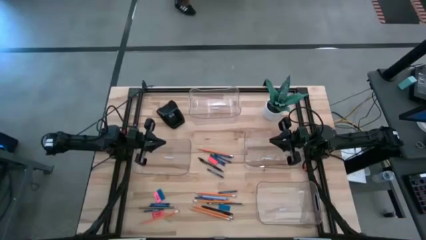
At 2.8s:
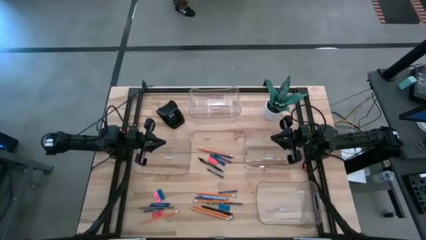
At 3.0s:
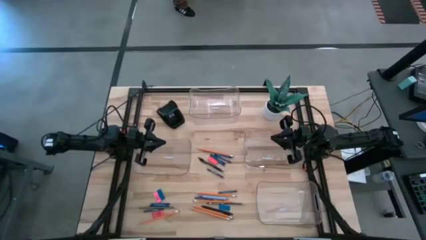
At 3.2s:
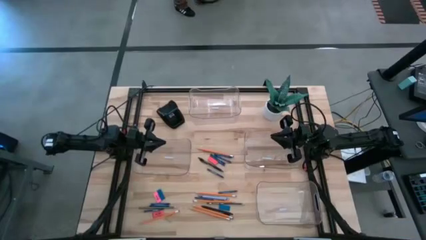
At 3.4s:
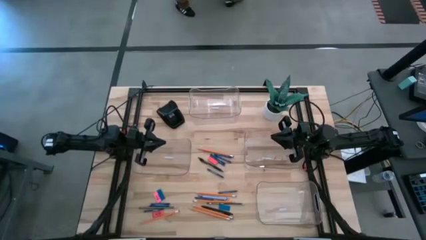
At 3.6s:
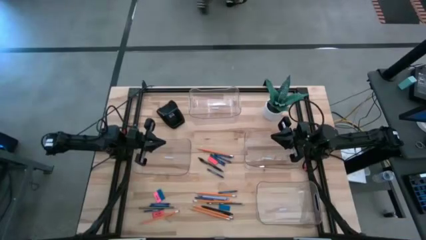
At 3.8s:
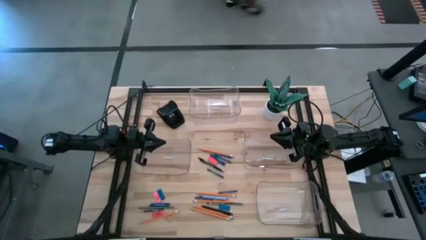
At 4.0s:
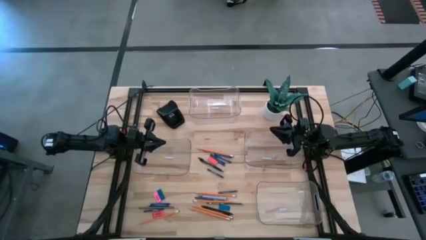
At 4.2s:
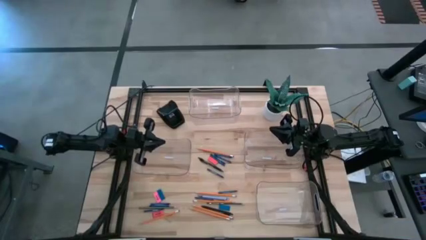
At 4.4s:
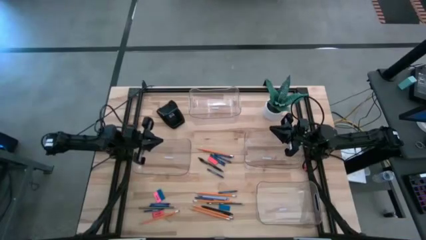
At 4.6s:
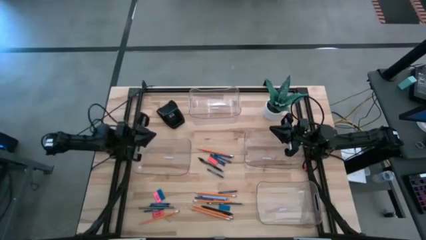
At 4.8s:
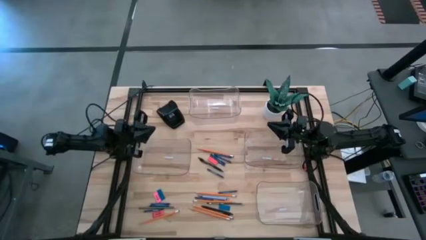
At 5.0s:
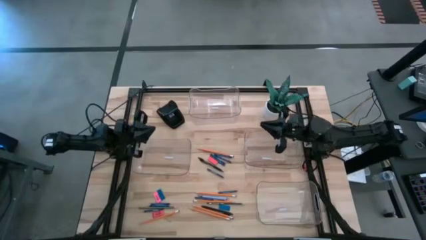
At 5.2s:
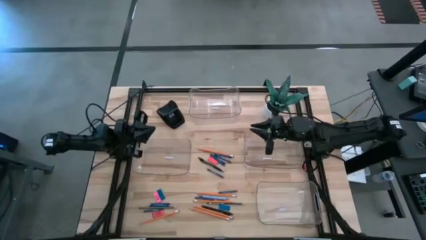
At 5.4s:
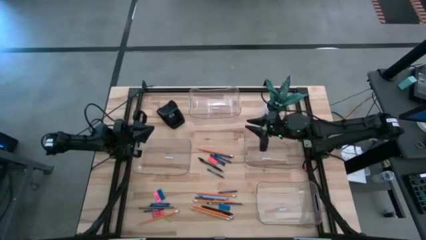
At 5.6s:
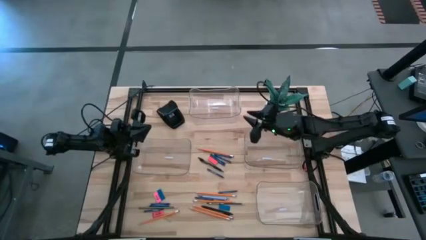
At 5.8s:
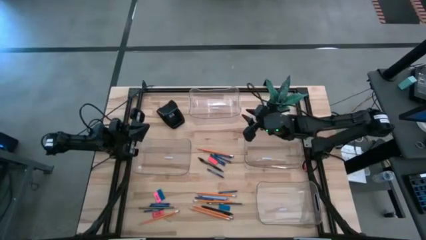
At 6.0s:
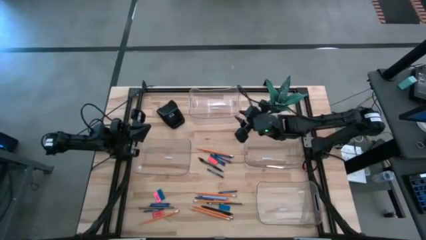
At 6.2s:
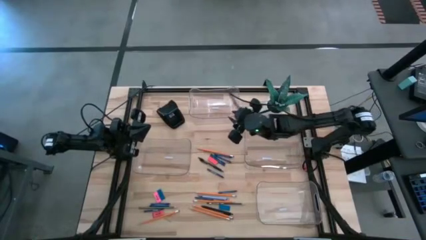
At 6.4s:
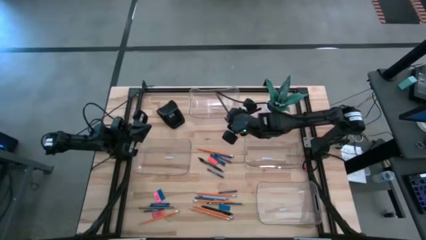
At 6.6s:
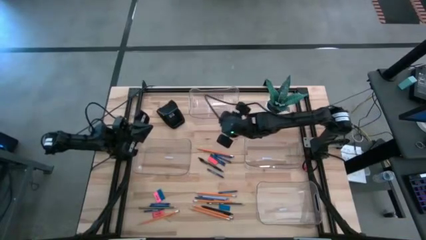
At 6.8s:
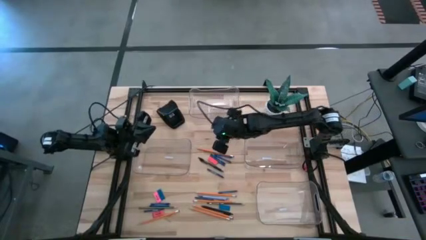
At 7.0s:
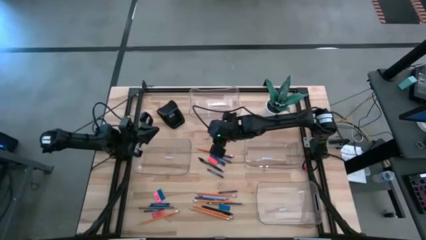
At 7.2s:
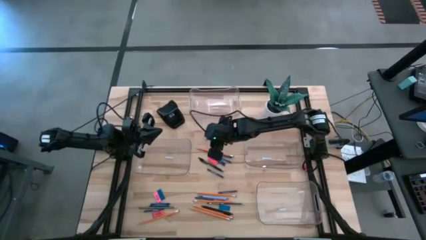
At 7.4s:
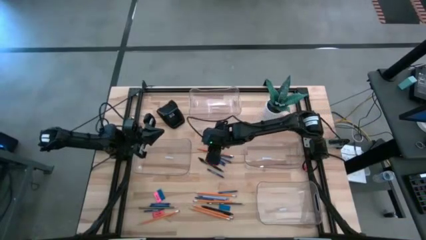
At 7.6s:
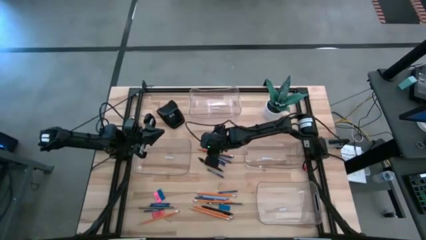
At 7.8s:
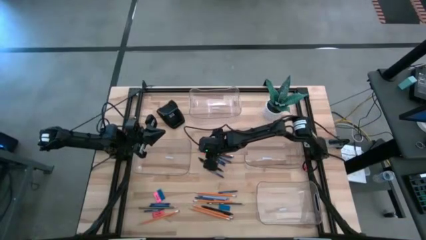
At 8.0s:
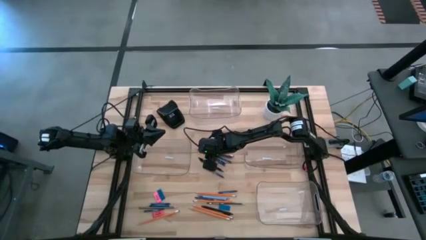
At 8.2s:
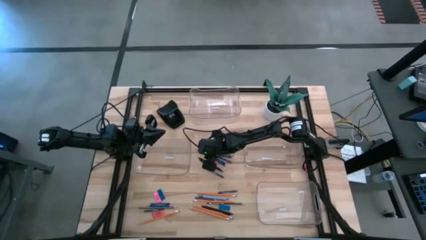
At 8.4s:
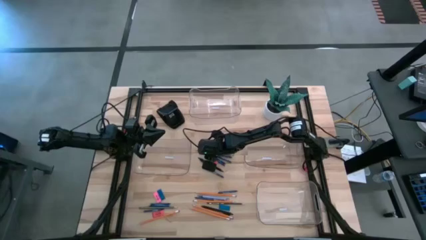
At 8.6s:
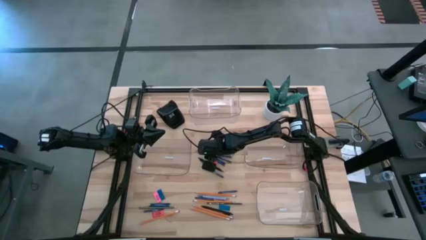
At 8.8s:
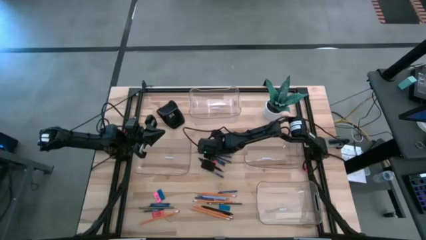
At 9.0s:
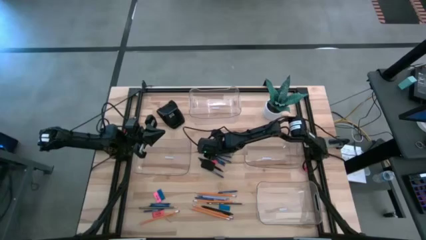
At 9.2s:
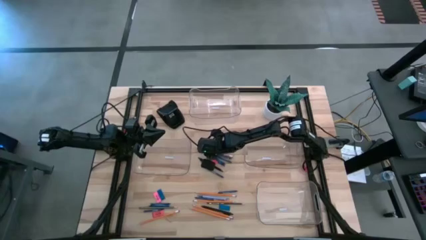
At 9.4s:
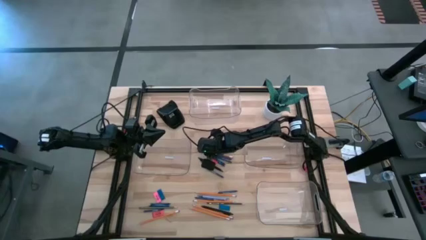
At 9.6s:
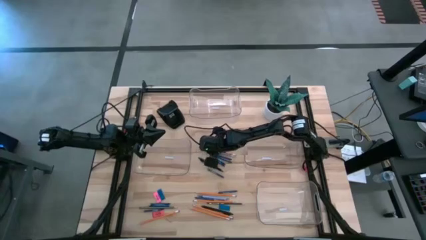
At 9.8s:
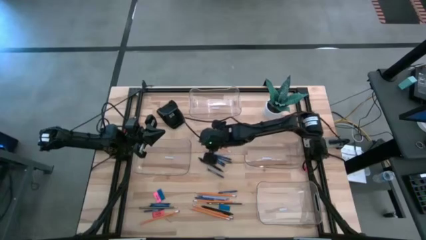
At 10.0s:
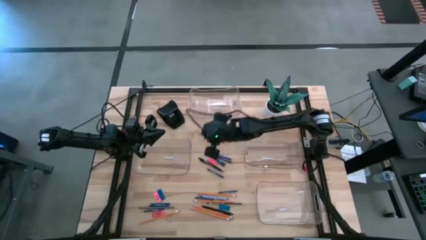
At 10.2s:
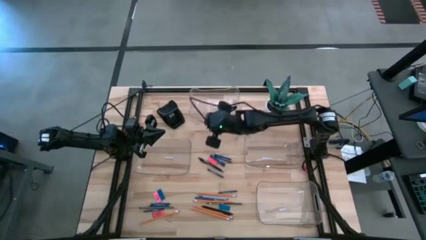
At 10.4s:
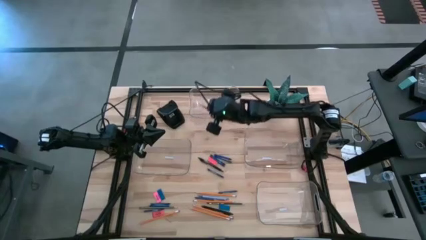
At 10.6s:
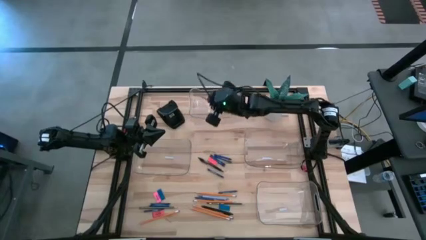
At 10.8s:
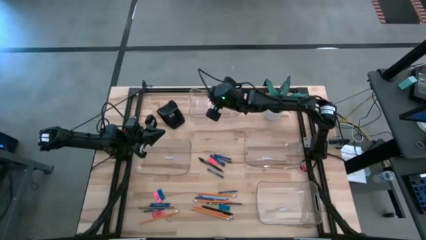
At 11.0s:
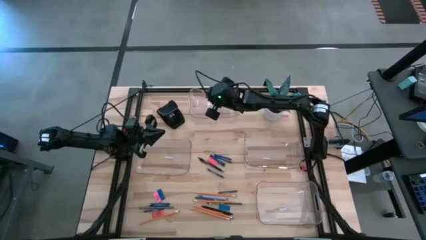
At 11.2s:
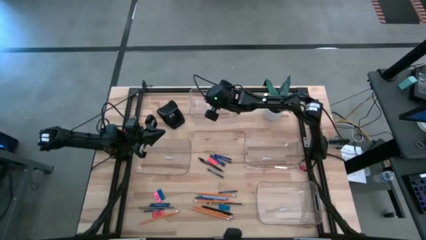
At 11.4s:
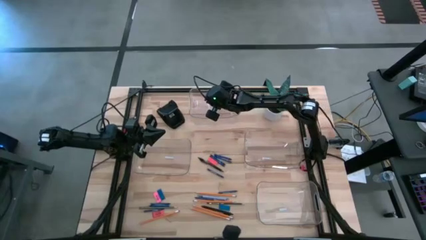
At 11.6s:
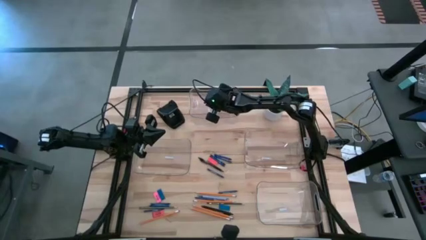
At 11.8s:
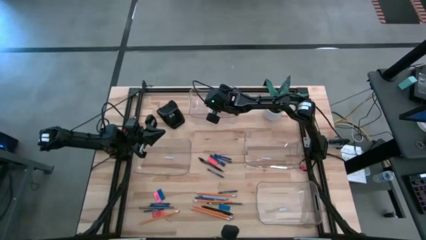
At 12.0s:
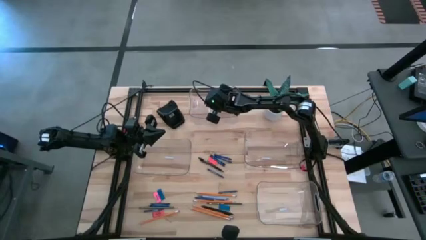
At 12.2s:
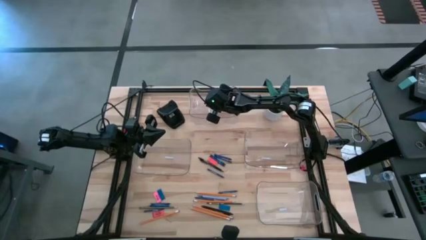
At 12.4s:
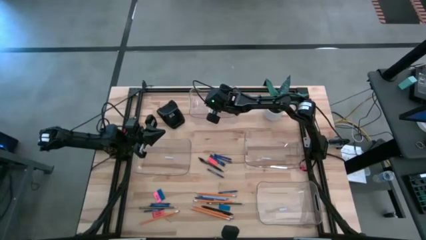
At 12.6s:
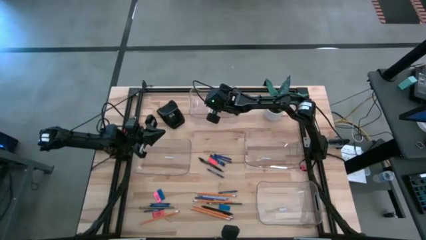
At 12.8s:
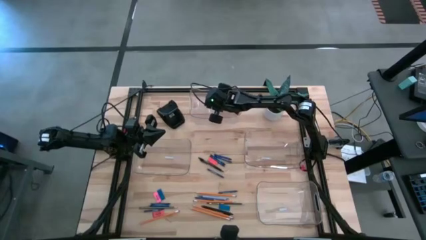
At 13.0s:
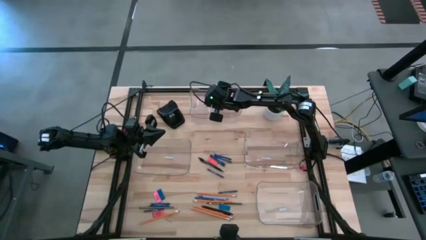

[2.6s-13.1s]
Task: Sort crayons/erasers/pens/pencils in bins
Put the yellow pencil into the top transparent bin

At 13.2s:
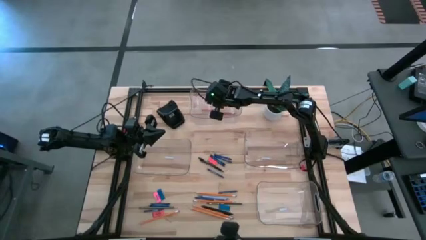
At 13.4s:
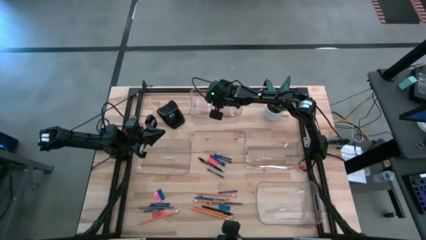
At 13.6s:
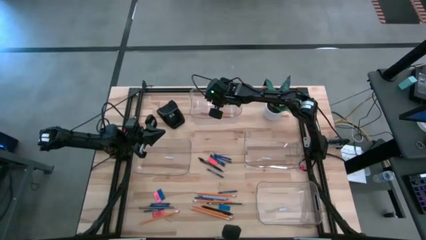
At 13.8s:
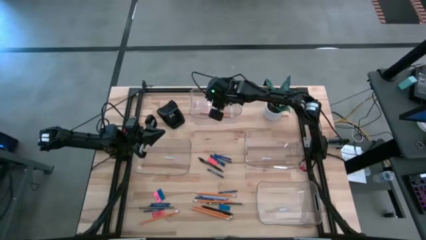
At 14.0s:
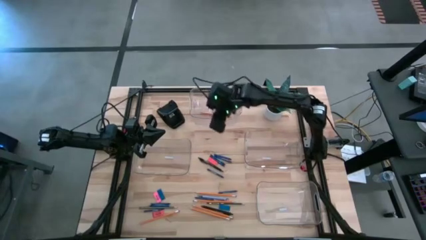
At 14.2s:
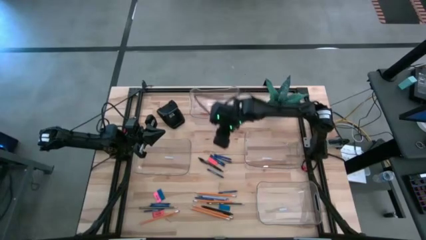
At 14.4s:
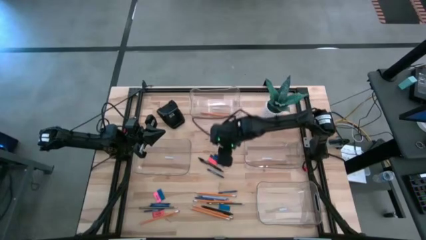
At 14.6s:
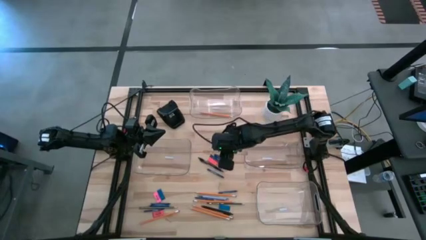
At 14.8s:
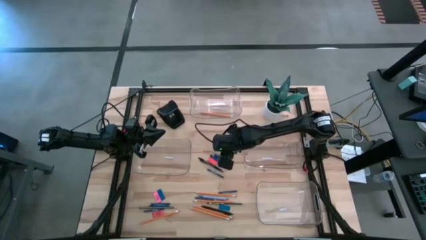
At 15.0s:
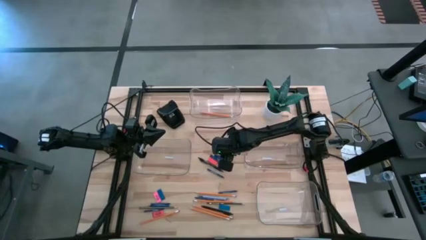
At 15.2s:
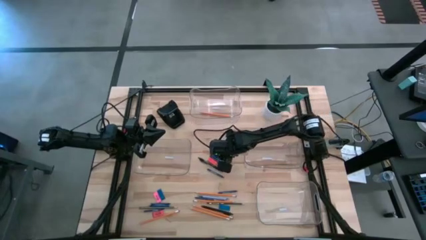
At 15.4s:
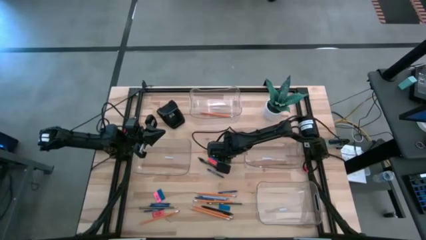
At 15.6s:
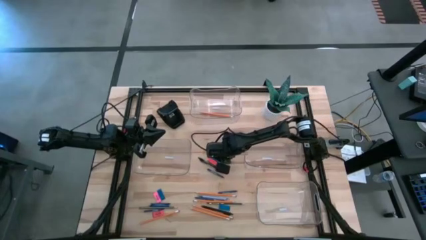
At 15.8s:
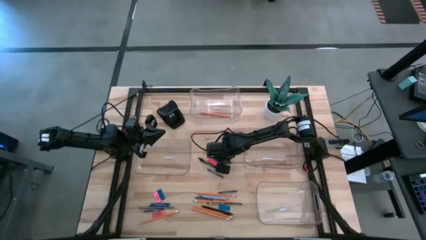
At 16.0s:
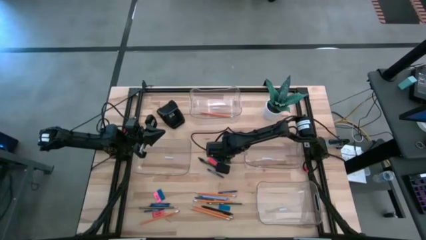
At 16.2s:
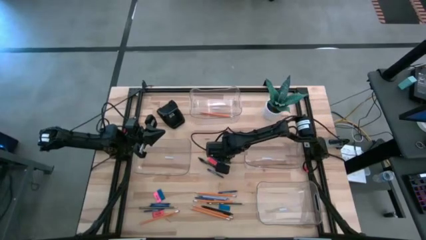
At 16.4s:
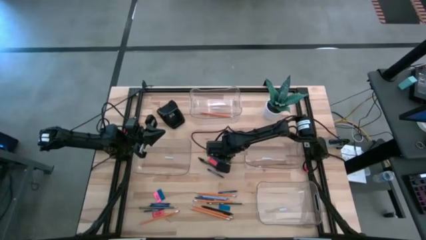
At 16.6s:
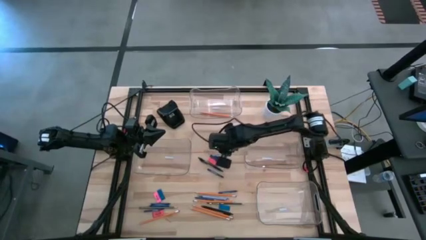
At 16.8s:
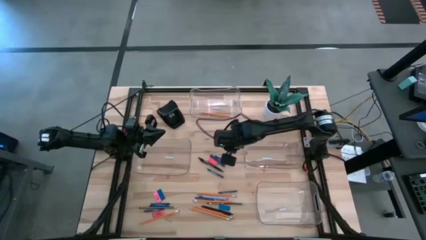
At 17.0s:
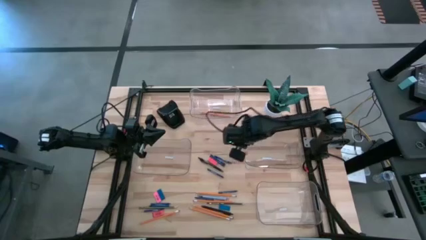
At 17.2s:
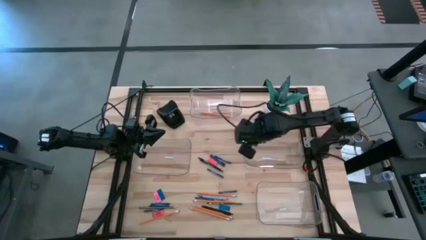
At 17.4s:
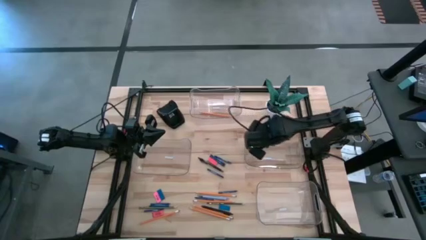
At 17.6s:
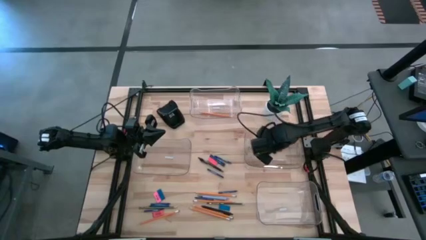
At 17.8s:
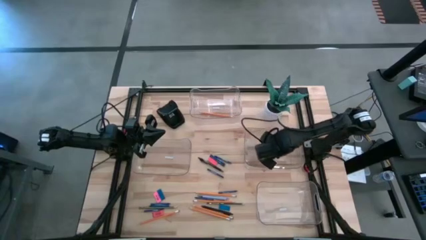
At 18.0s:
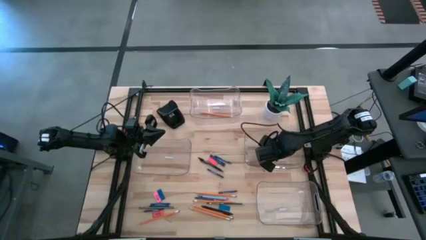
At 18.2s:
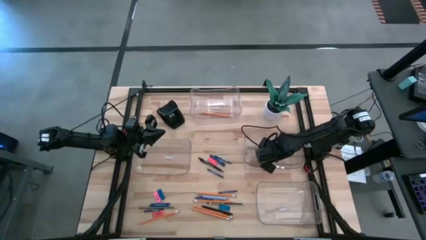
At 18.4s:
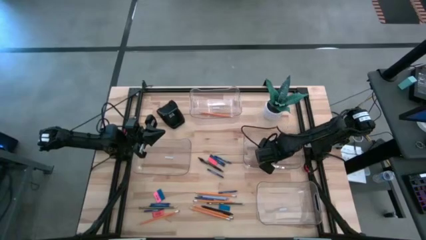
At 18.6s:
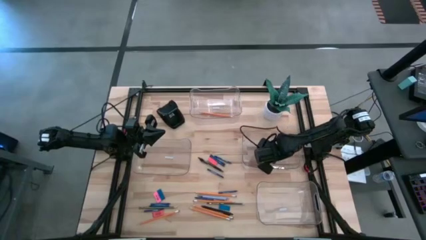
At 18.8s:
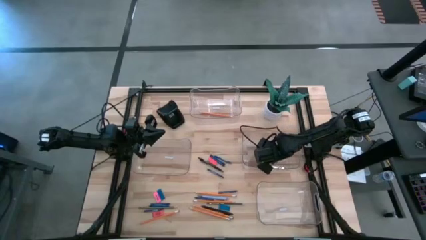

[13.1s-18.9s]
Put the blue crayon into the middle right transparent bin
